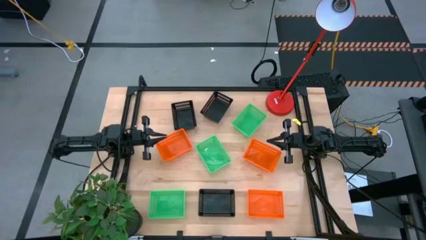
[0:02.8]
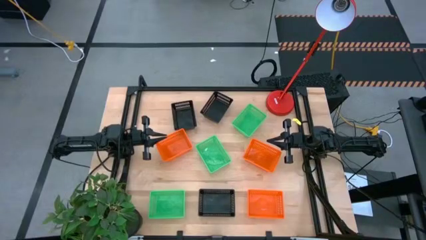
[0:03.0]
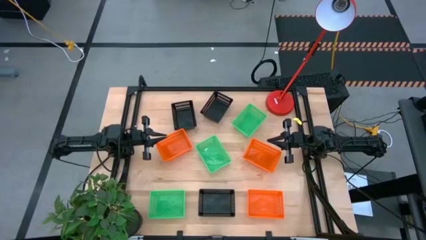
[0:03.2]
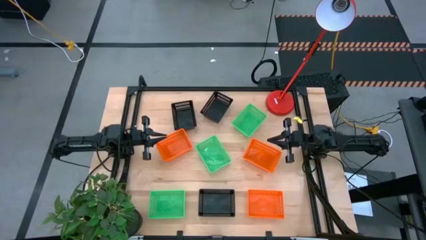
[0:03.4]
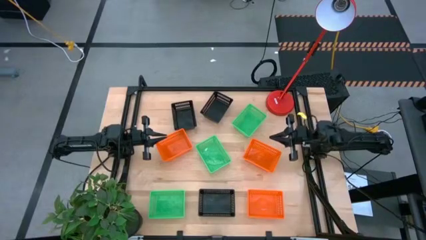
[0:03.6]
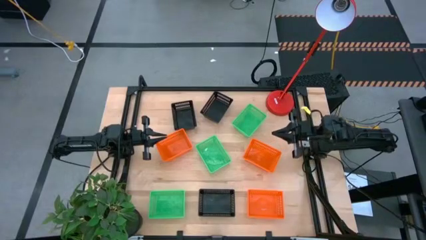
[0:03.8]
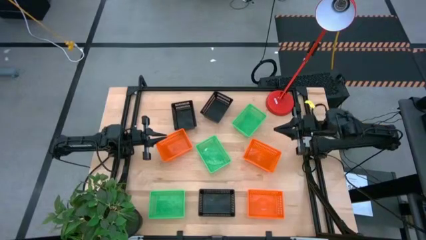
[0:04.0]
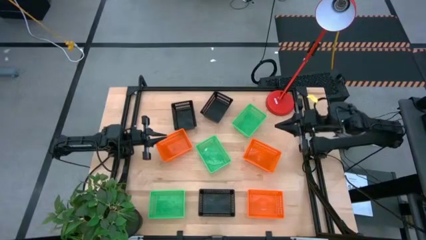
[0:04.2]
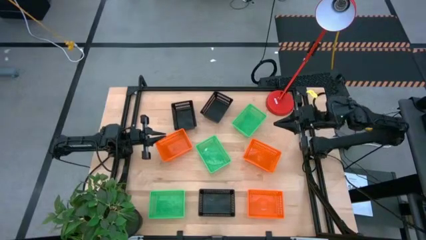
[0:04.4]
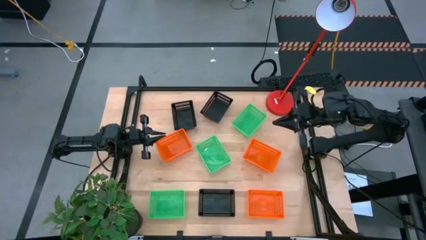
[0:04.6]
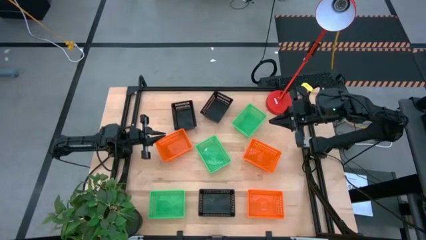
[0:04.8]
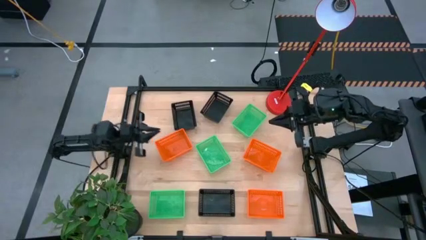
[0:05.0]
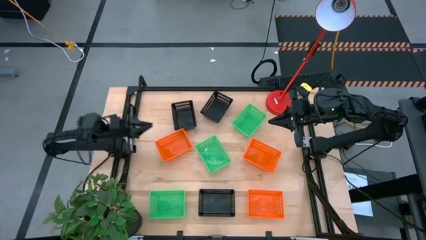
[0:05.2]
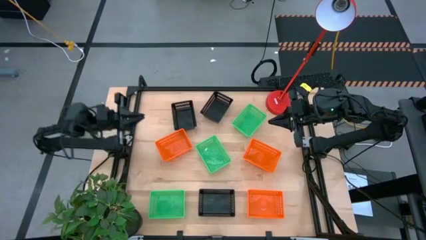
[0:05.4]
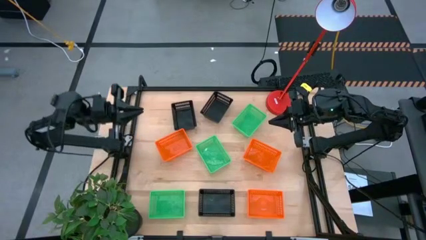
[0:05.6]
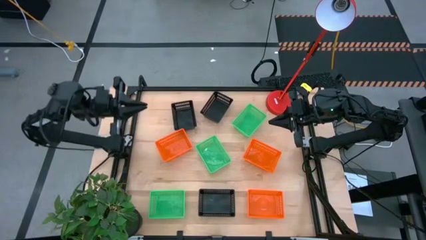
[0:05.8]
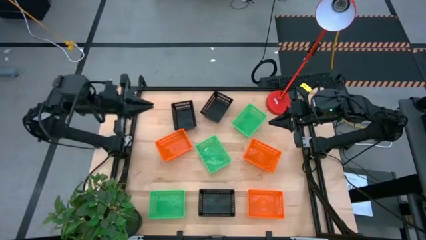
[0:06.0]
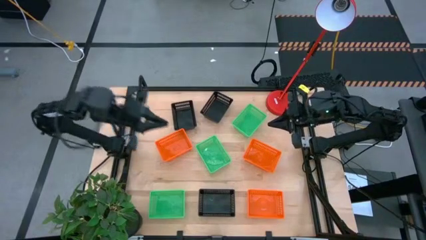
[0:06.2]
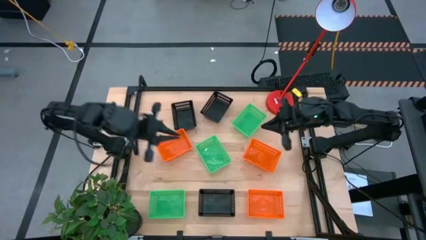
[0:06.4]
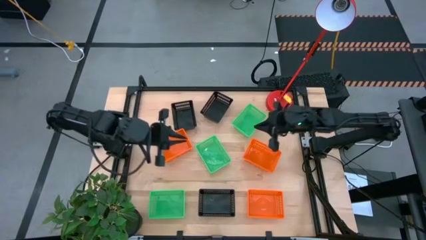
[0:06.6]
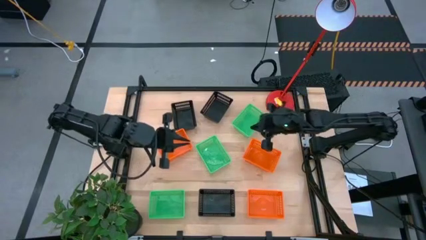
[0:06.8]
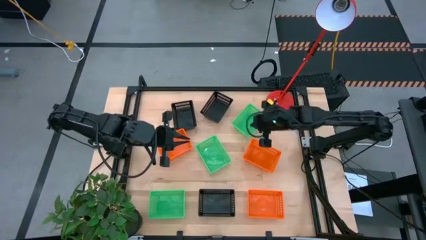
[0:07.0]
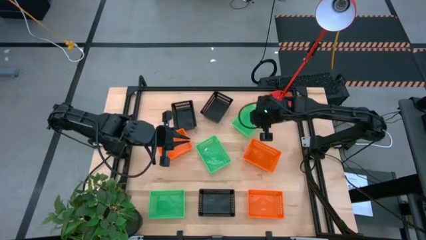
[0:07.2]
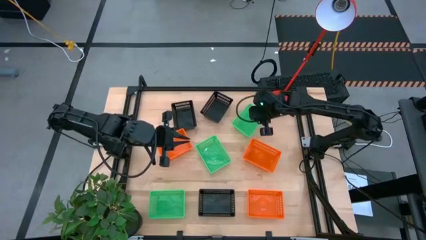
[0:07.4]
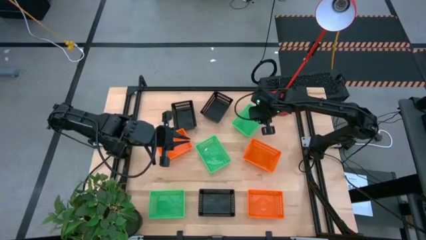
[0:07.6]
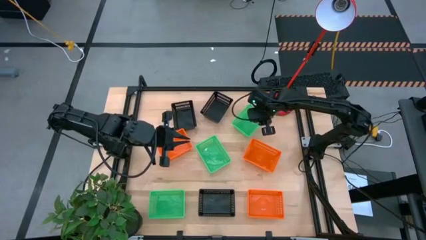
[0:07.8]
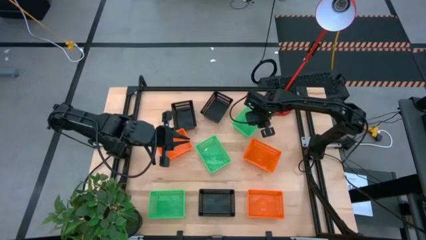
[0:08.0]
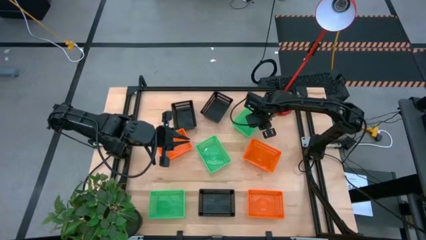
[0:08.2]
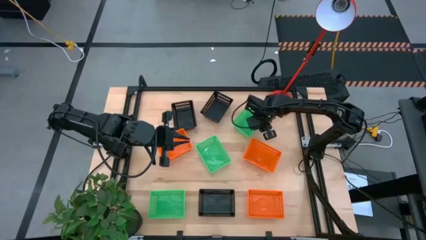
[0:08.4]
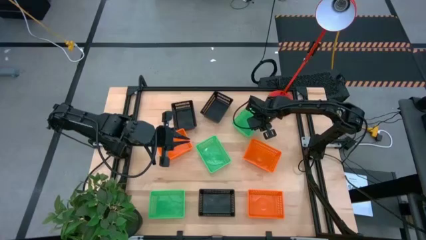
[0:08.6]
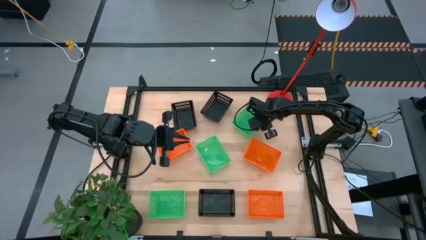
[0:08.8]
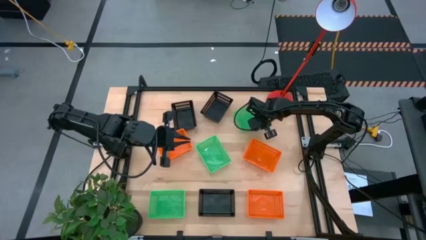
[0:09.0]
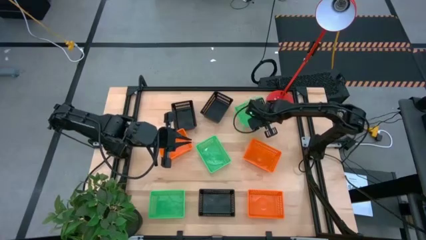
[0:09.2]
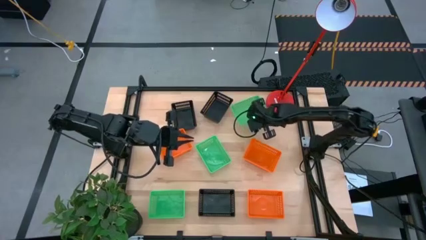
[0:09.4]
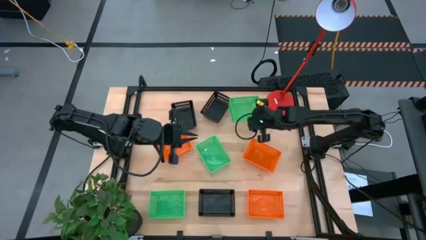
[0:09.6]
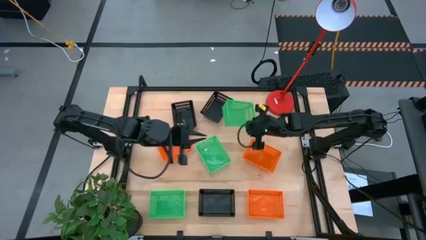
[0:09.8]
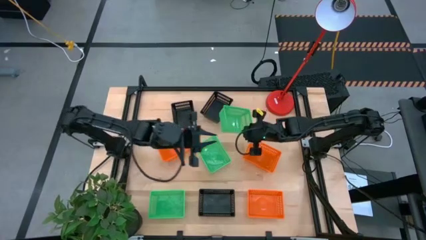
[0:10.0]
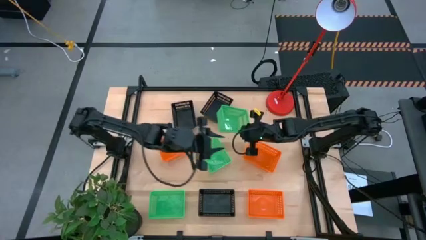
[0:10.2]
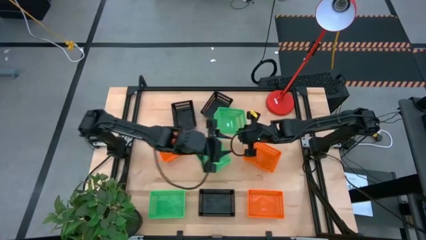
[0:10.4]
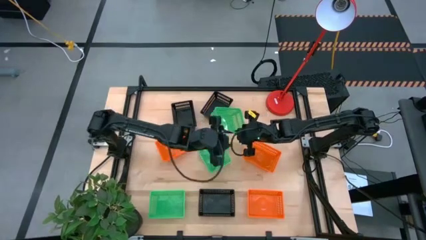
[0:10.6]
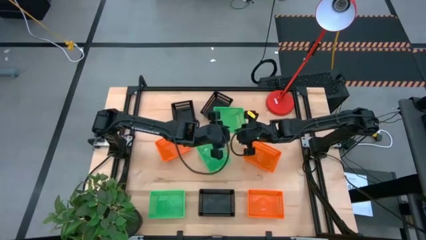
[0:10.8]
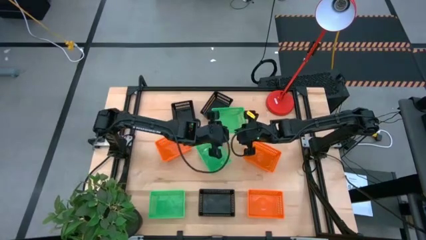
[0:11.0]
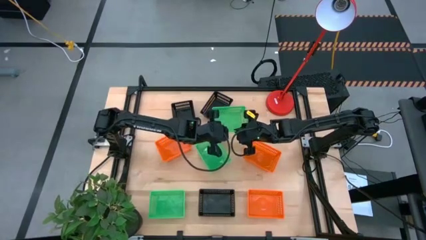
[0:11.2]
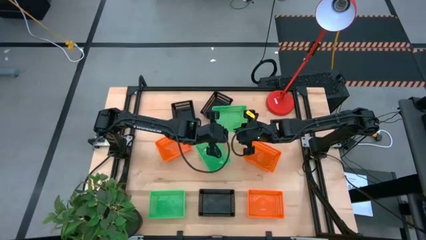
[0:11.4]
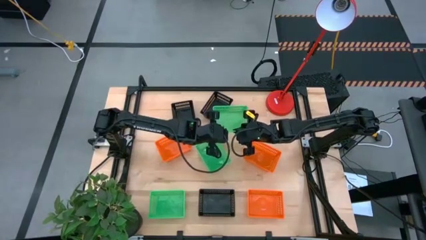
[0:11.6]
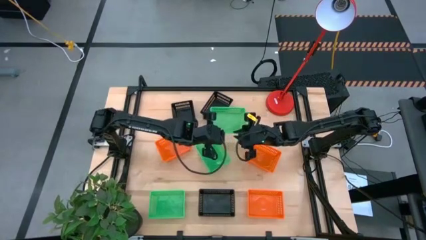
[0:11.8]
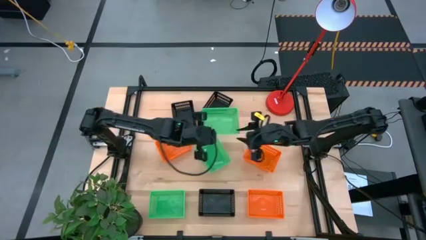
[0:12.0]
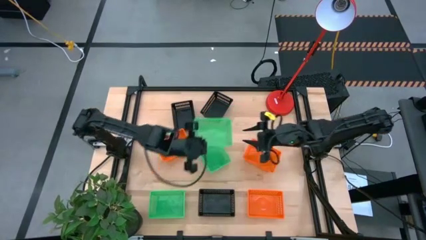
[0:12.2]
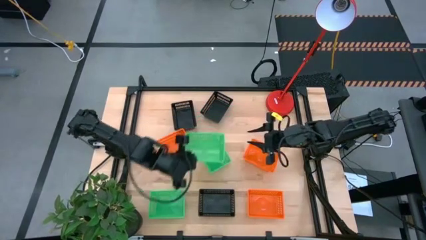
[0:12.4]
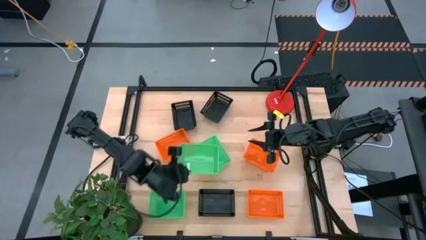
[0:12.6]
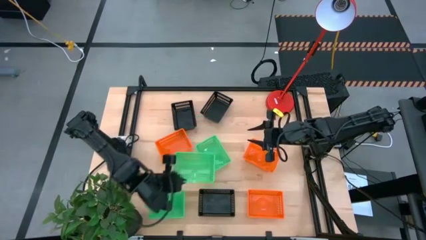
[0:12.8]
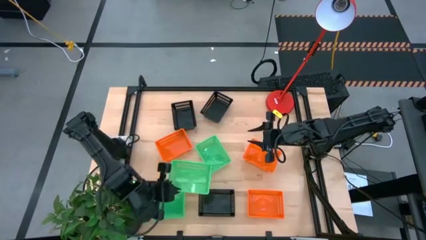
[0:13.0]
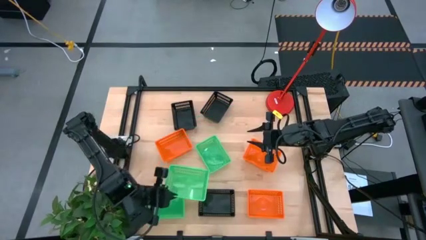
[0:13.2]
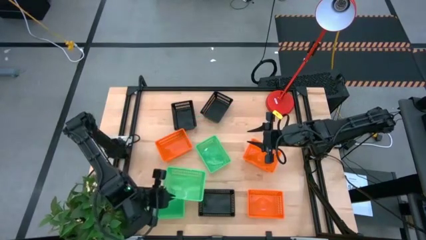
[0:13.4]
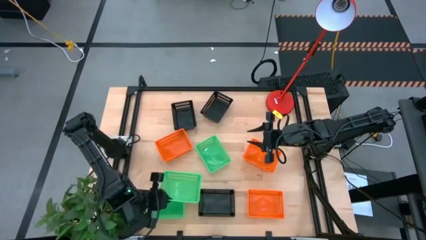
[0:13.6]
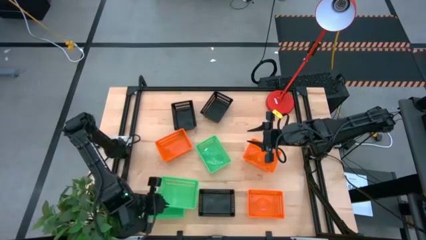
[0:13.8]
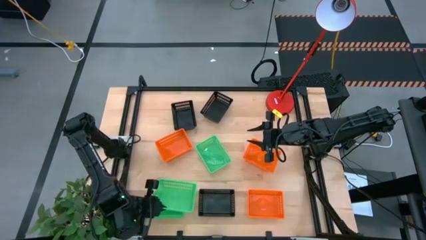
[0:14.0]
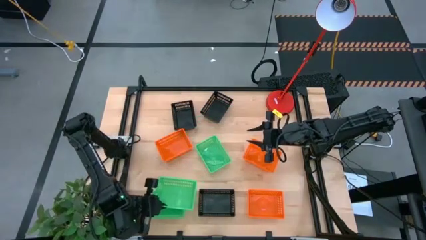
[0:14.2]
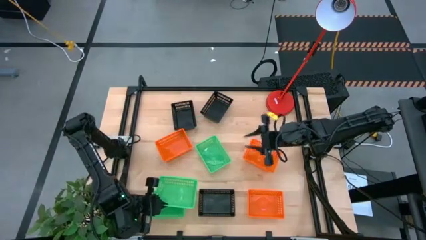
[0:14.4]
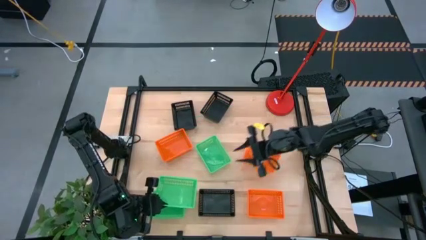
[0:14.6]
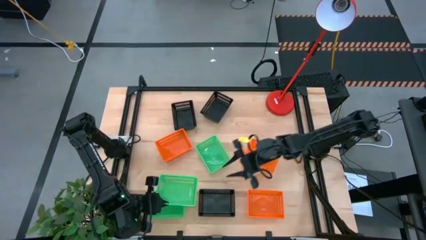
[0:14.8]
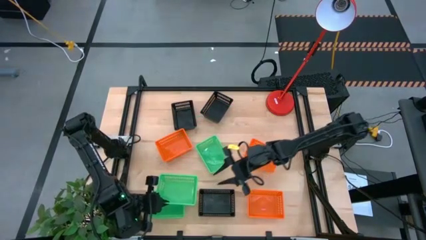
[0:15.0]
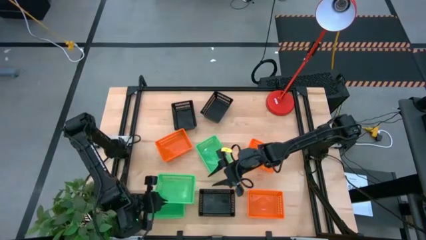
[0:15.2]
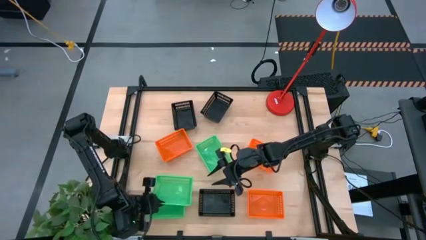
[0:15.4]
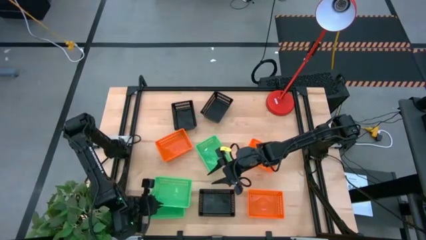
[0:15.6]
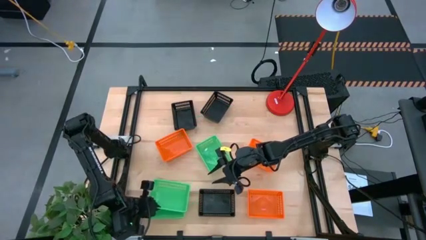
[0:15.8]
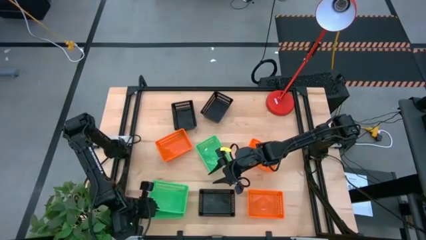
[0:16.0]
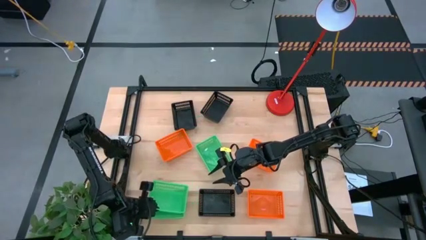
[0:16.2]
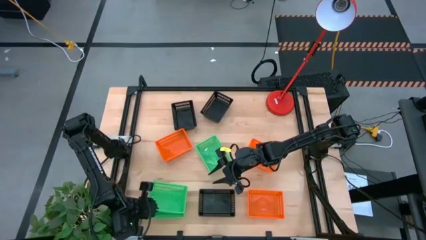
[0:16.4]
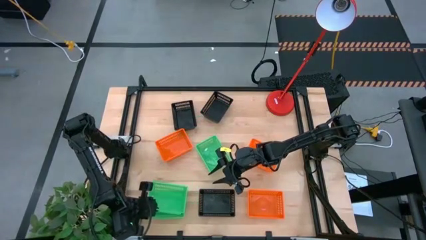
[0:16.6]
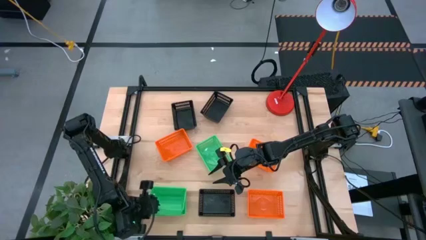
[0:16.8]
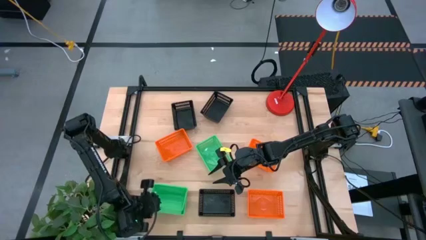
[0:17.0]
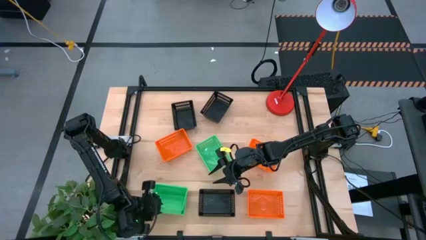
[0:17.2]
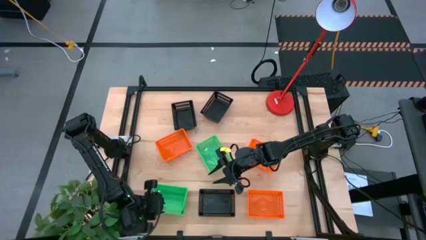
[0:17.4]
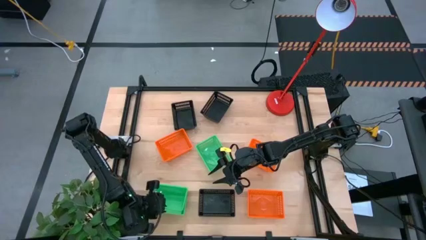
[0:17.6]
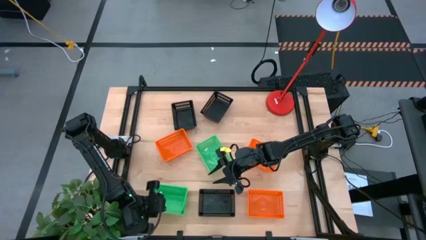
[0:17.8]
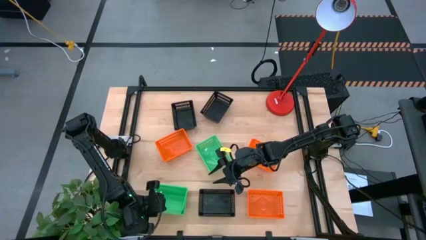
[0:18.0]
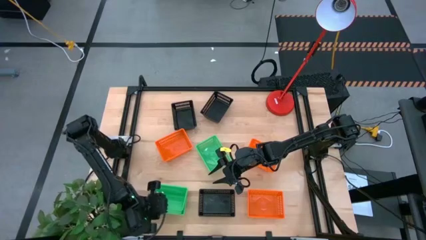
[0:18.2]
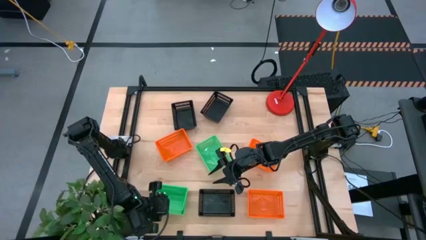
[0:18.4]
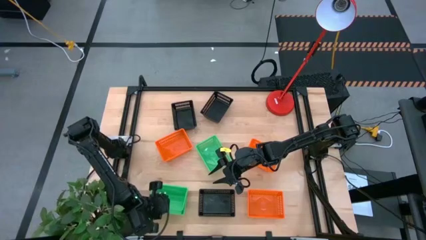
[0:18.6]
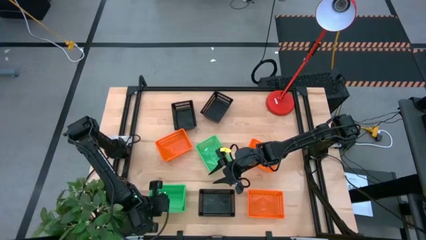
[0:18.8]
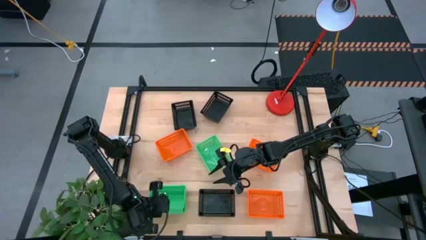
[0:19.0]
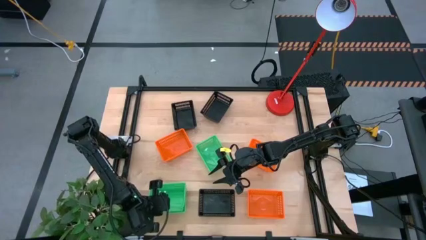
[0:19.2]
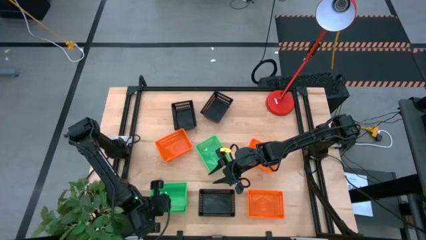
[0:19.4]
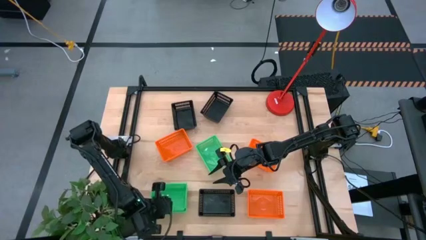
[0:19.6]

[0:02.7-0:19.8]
Stack the top green bin on top of the bottom green bin
